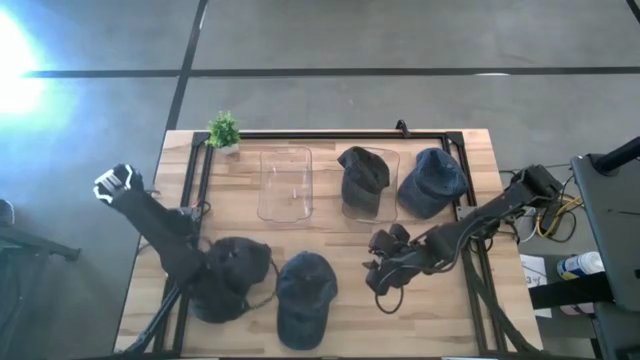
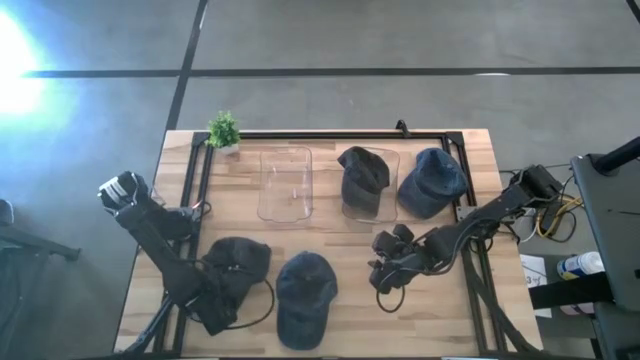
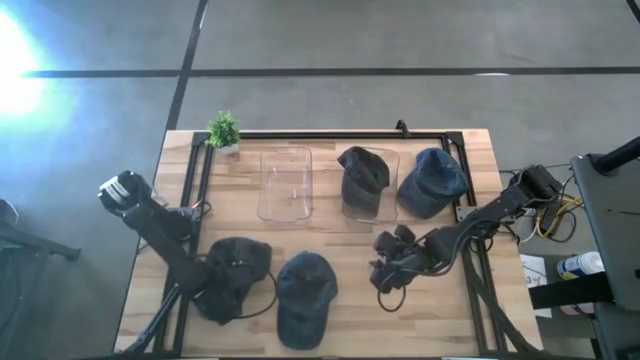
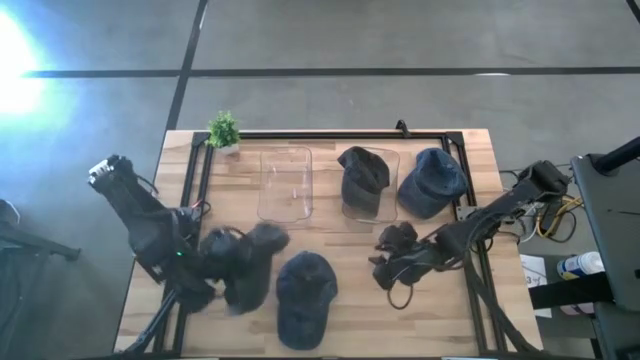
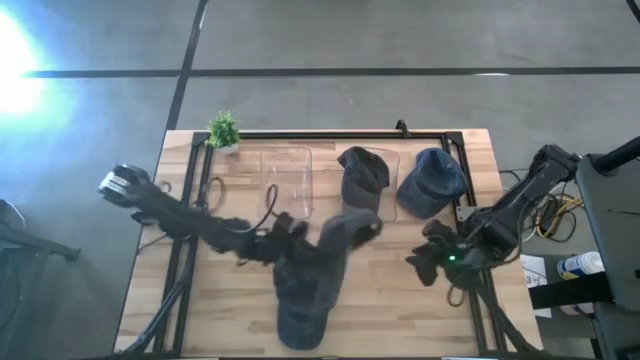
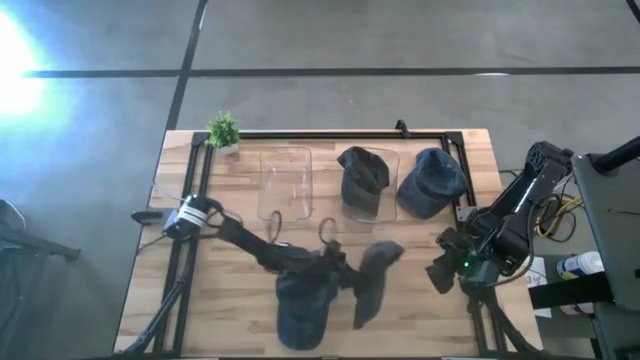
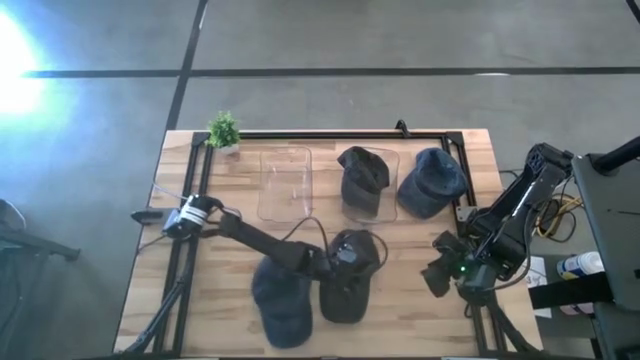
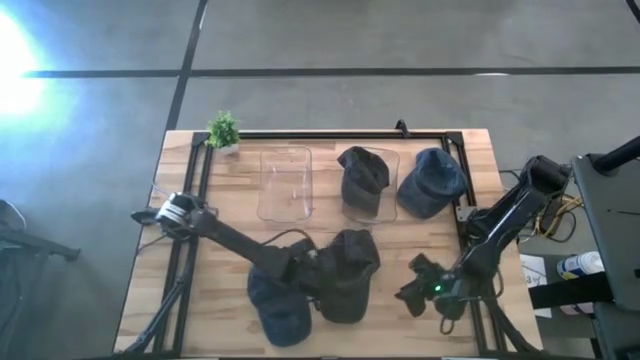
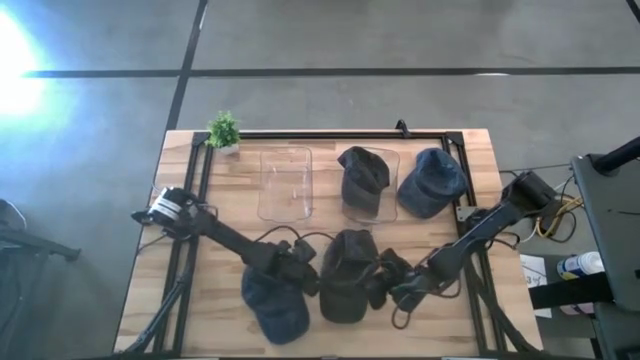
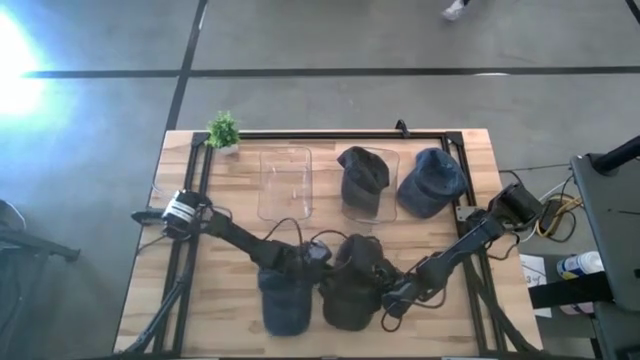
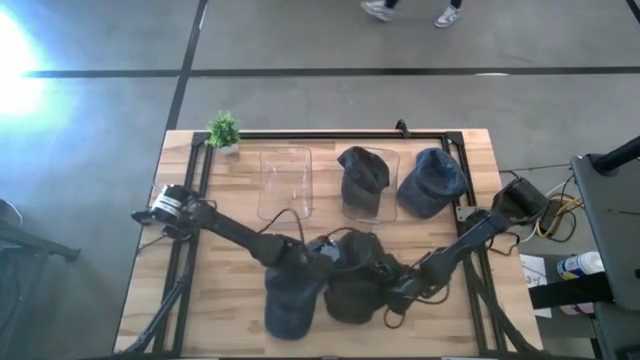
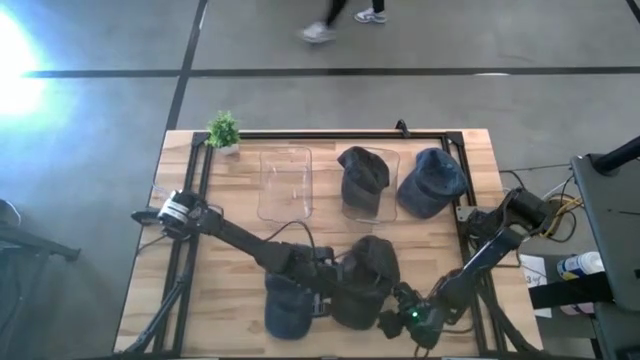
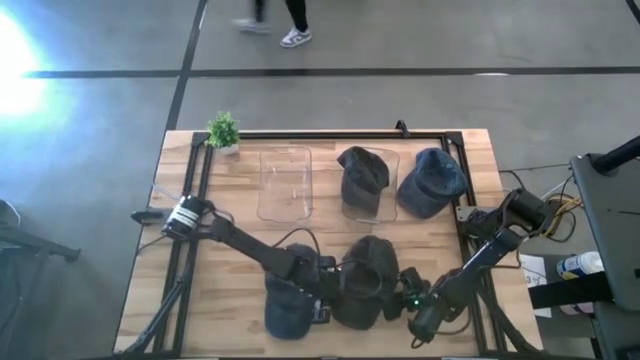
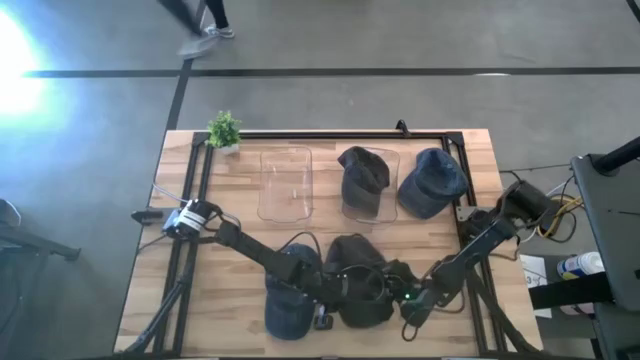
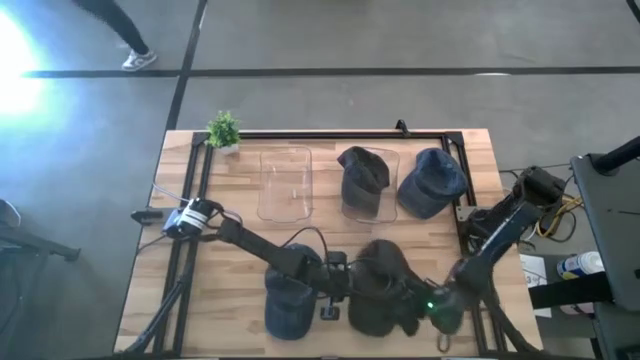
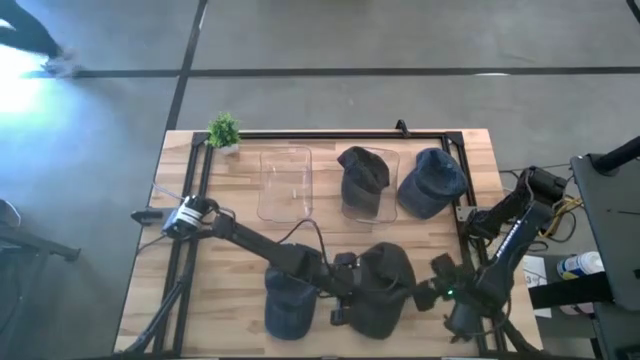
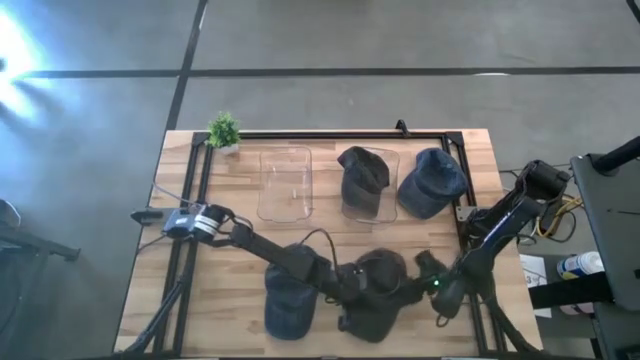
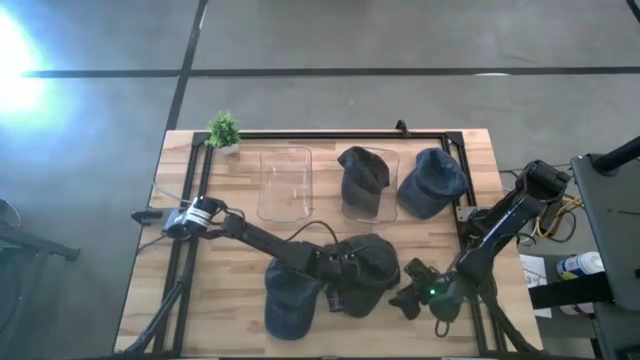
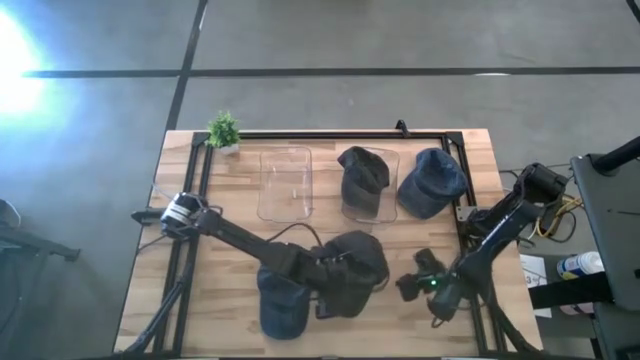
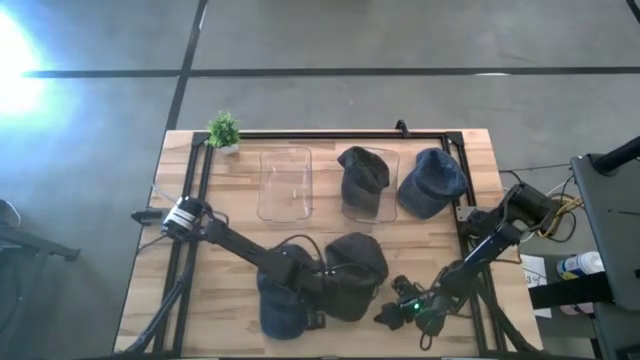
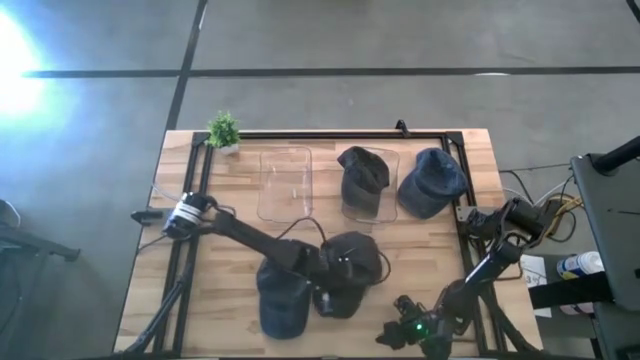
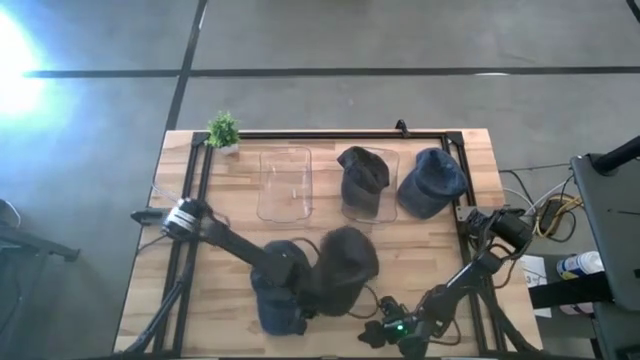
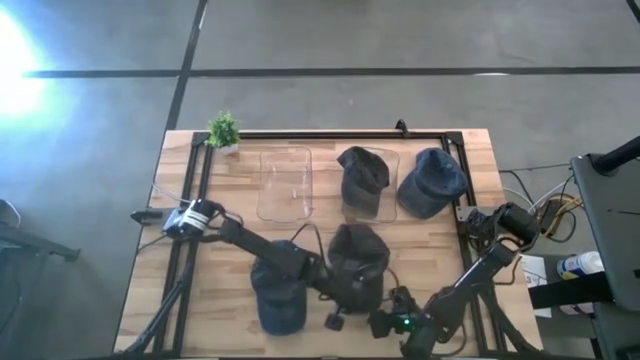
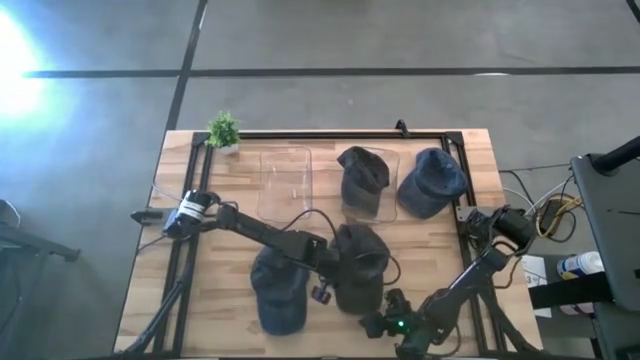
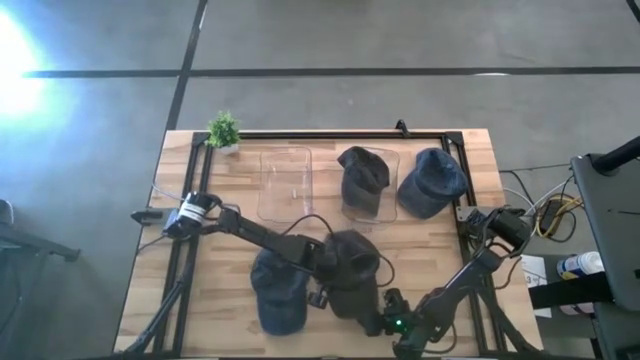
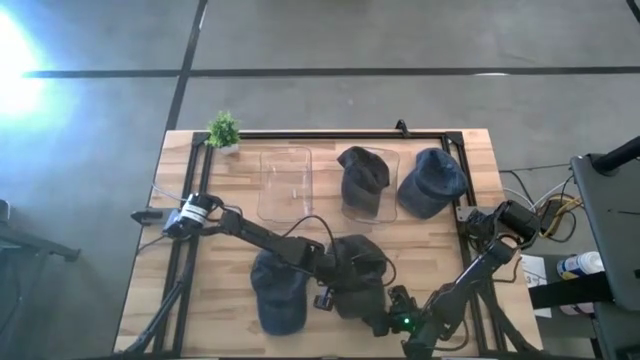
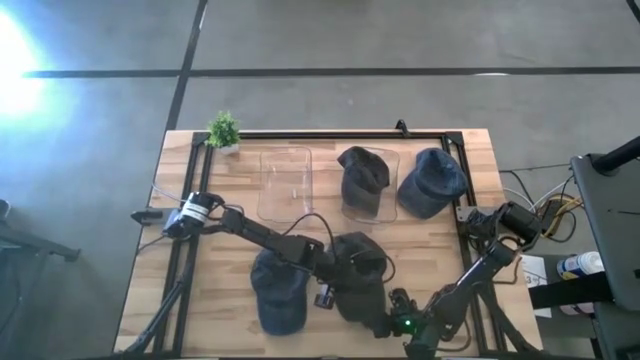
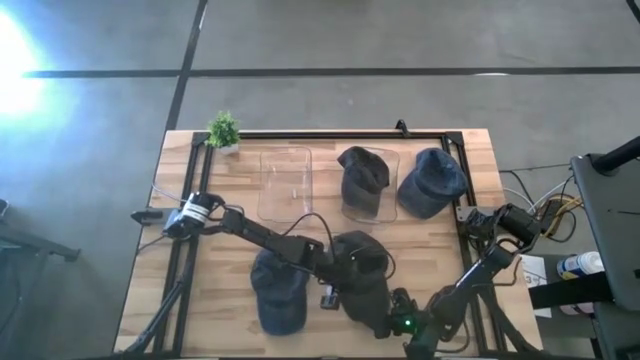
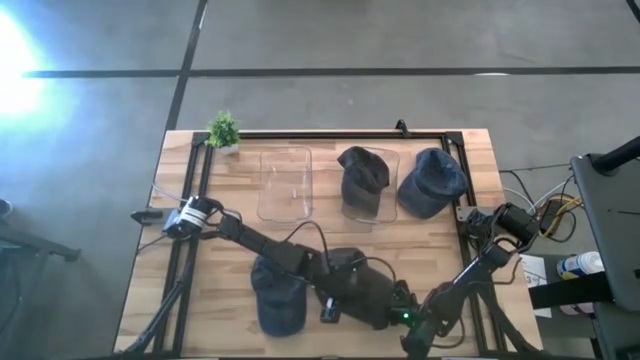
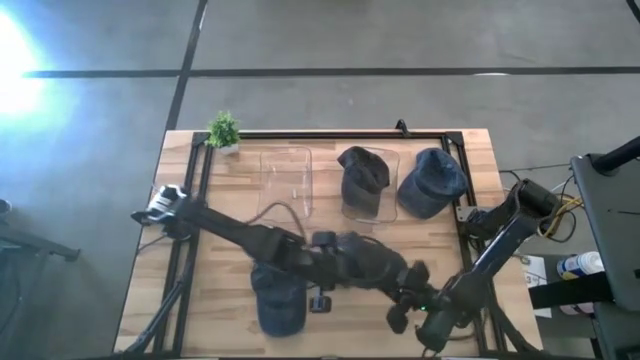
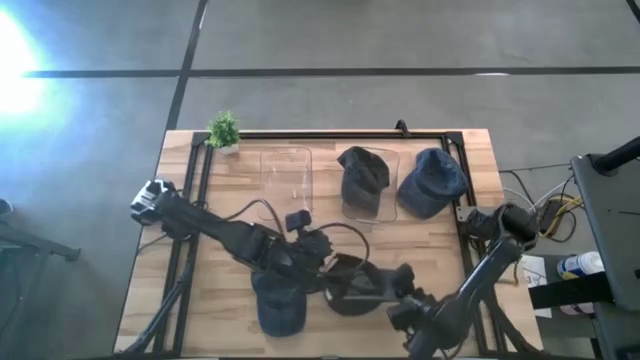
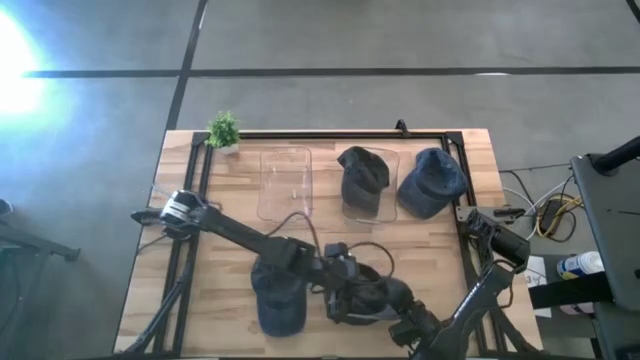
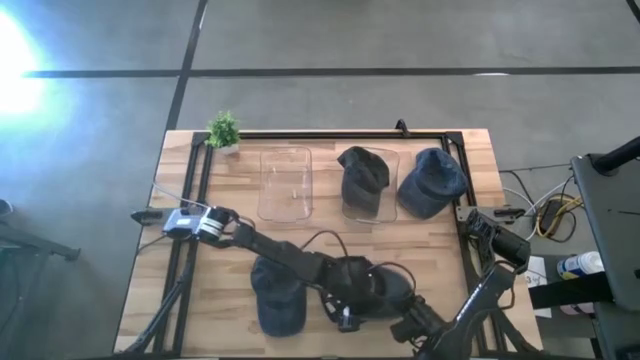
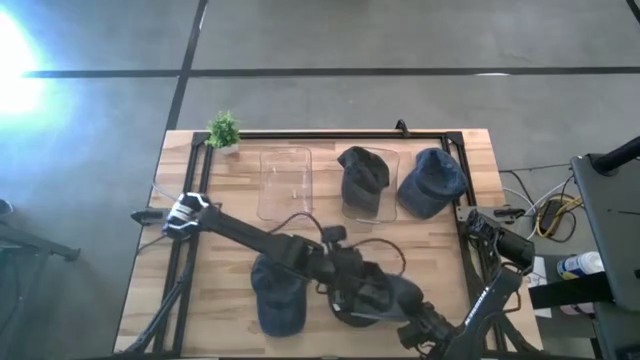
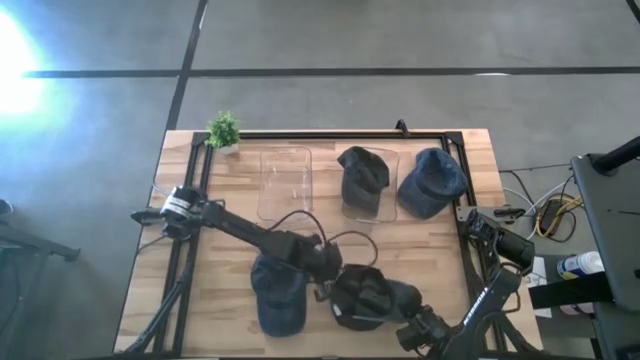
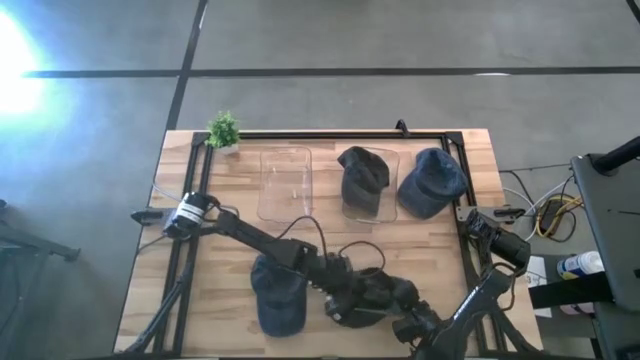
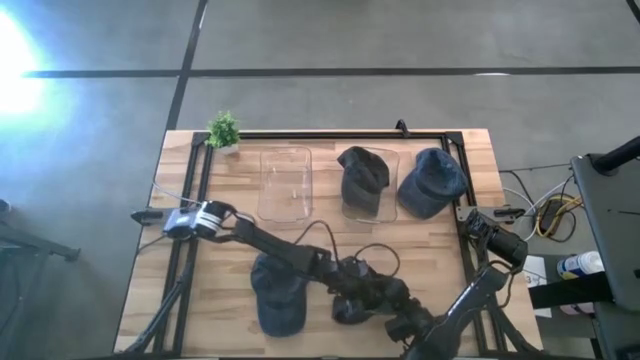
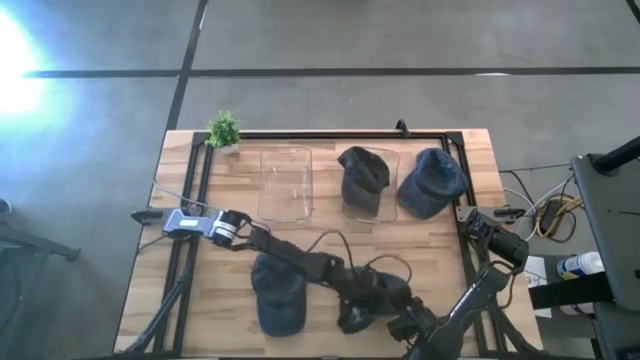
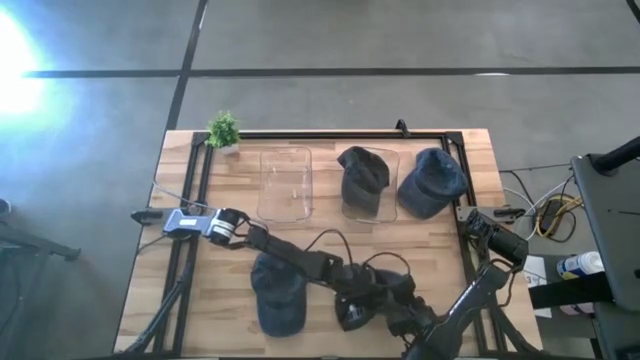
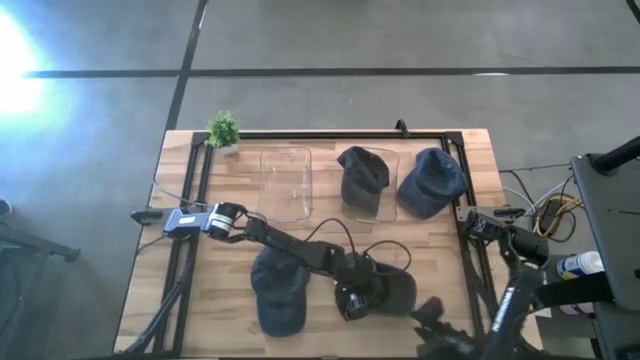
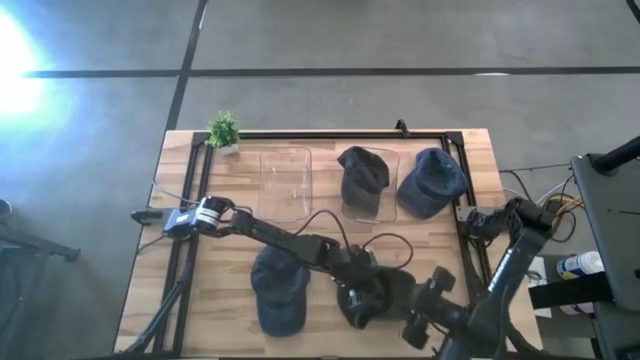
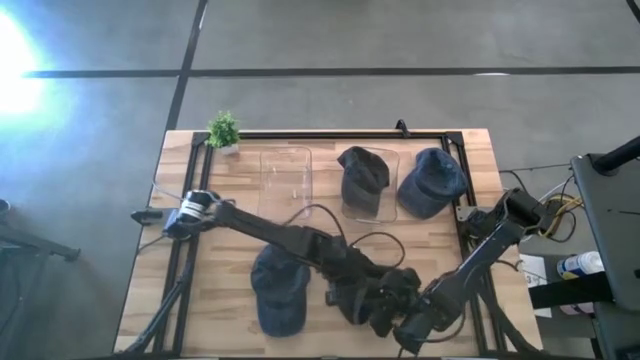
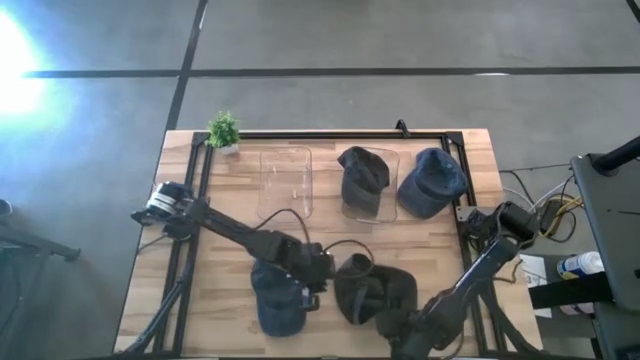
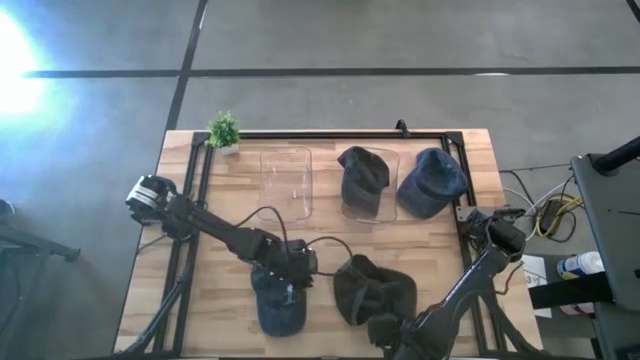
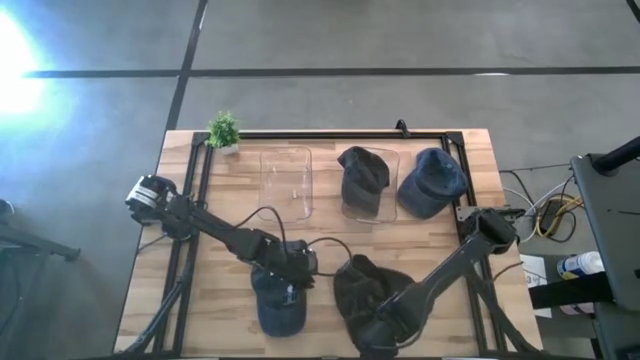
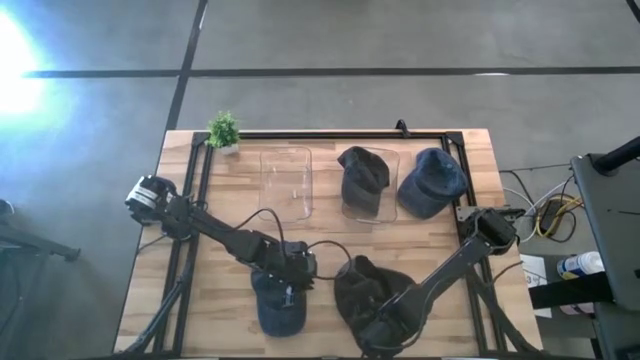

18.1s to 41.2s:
Task: Pick & Place hat
Put the gray cap into the right transparent bin
